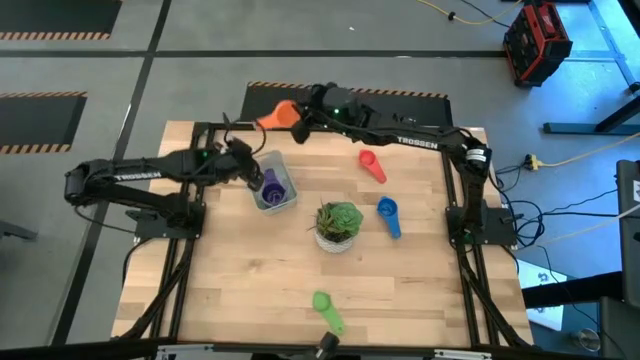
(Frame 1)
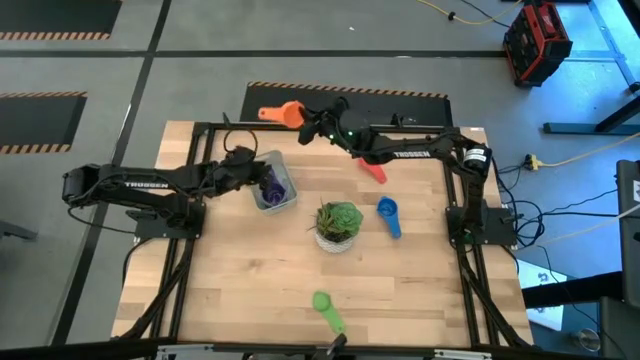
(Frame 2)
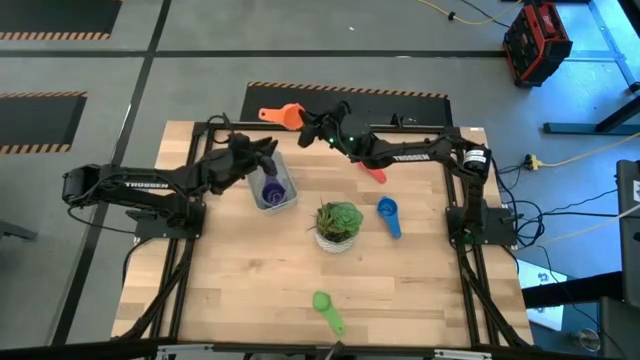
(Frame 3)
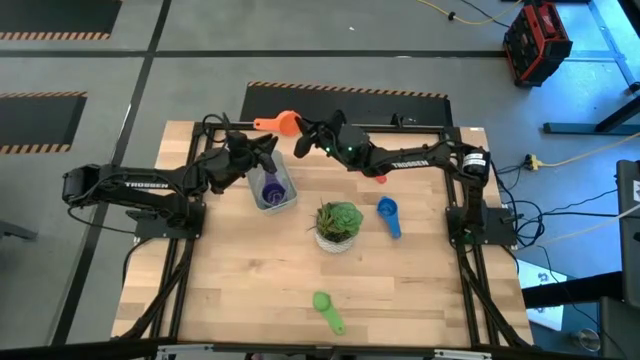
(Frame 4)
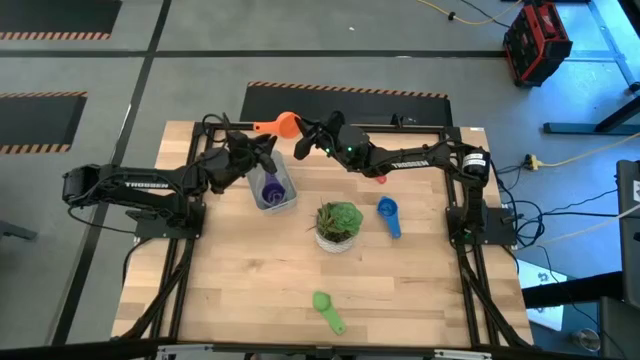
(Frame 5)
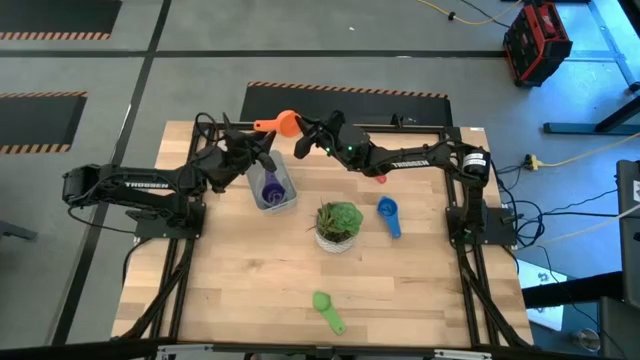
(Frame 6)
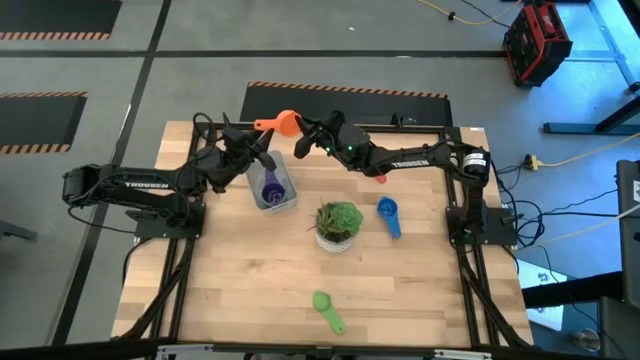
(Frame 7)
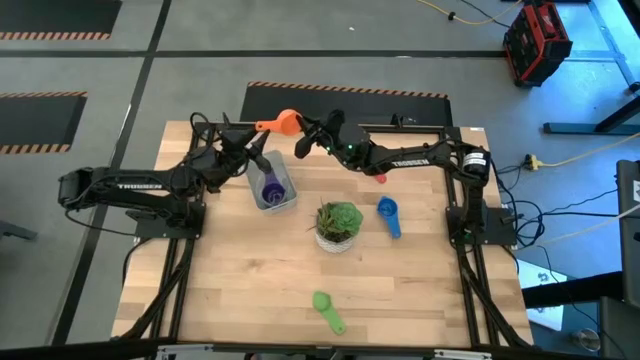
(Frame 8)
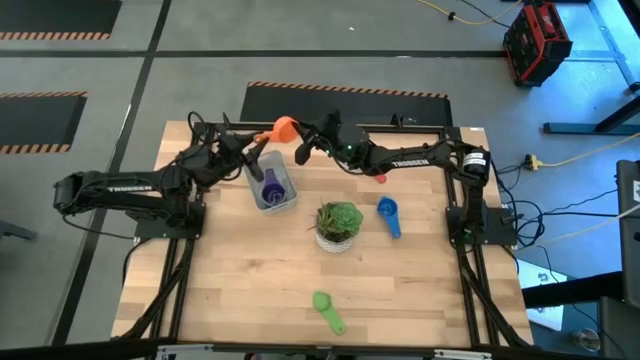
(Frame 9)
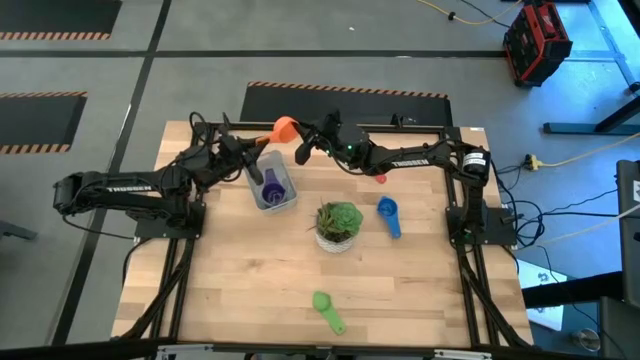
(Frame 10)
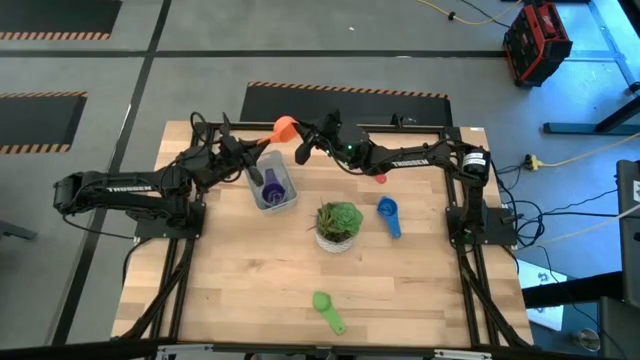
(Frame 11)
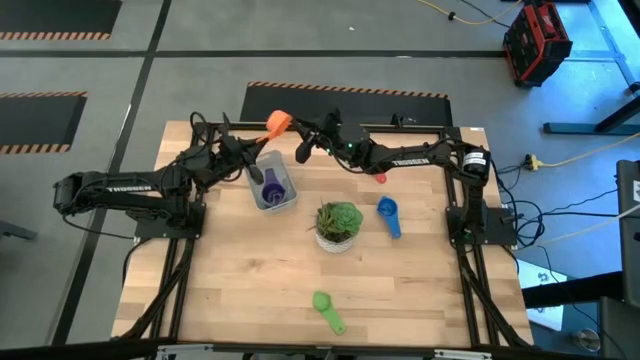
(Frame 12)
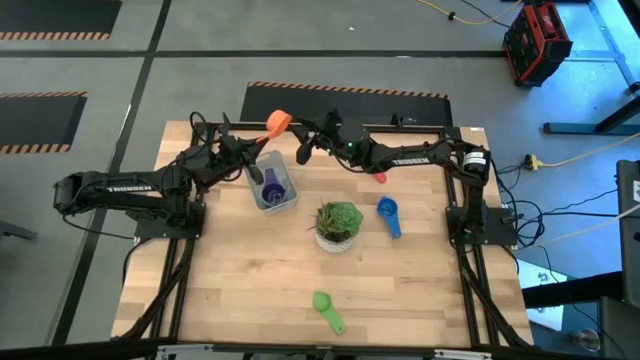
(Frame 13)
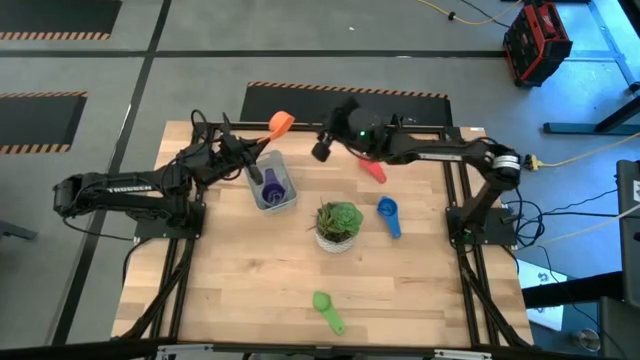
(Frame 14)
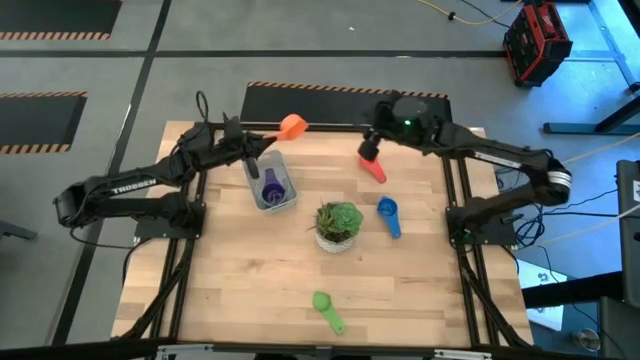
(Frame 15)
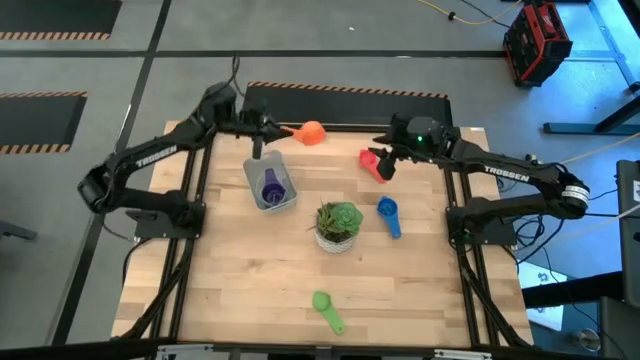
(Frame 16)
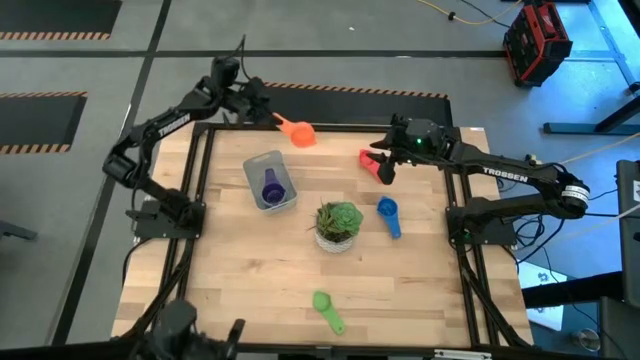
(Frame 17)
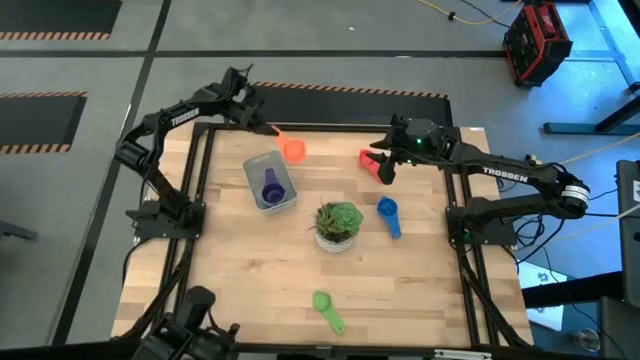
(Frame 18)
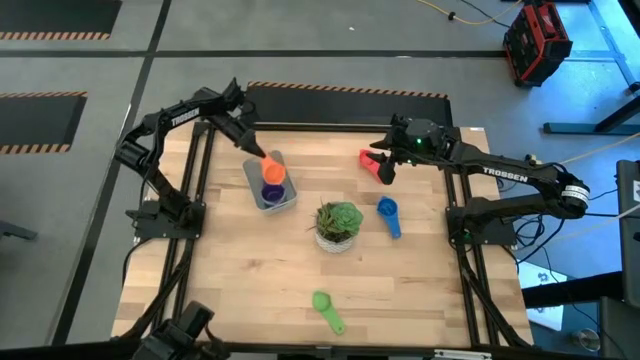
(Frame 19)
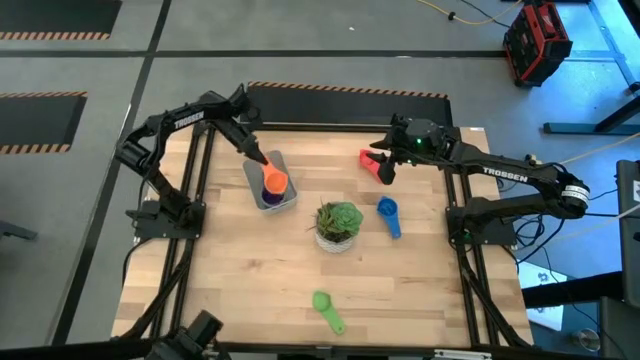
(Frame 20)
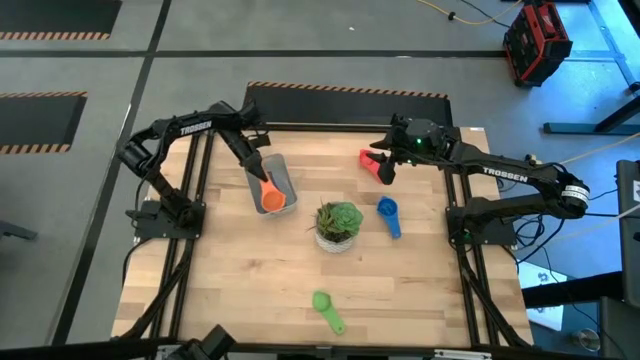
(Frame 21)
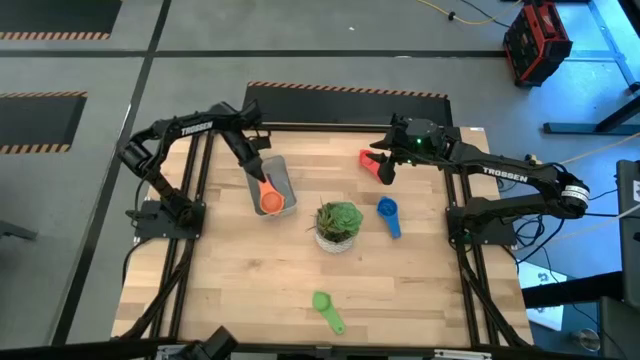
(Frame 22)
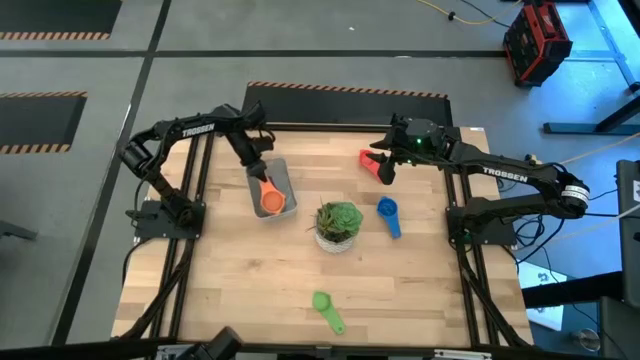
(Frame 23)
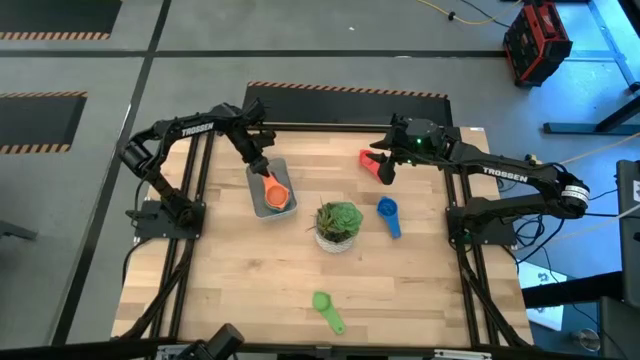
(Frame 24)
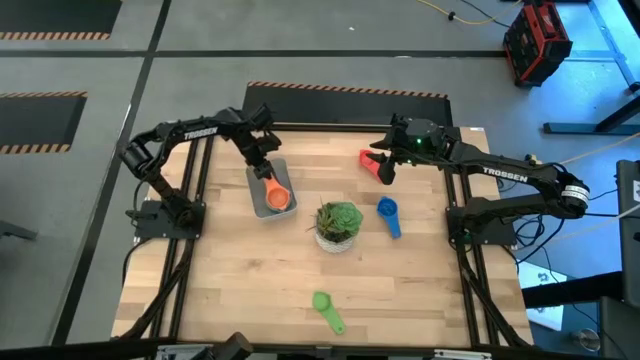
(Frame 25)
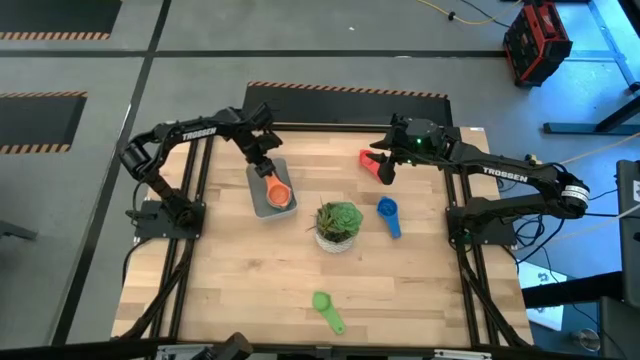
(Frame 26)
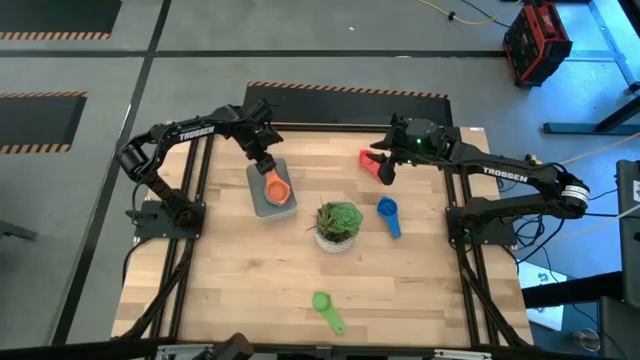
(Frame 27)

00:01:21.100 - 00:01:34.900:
Task: Nest measuring cups in basket
Stack the orange measuring cup on top of the violet measuring cup in the gray bin

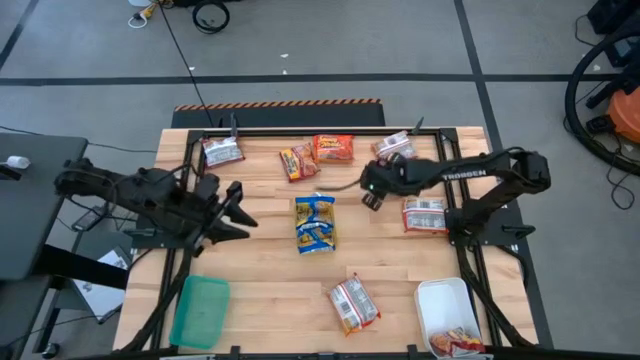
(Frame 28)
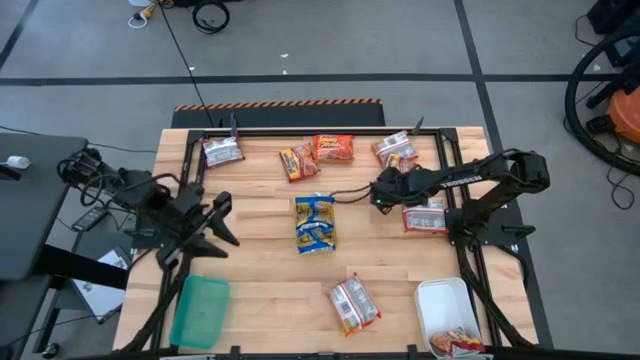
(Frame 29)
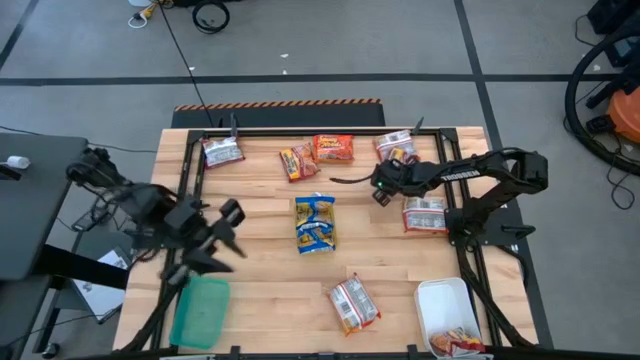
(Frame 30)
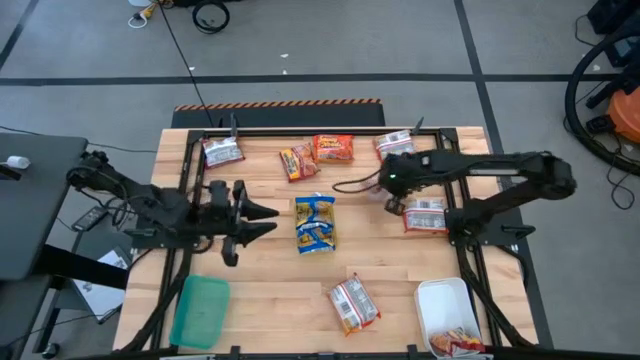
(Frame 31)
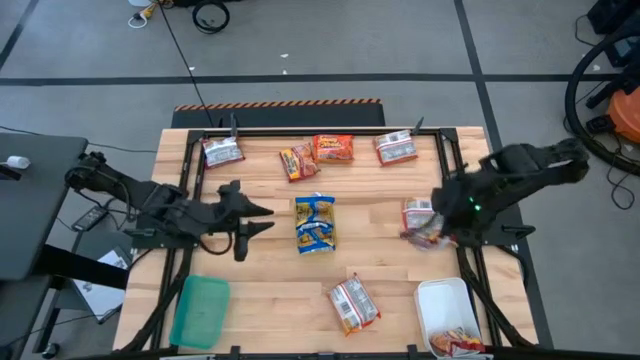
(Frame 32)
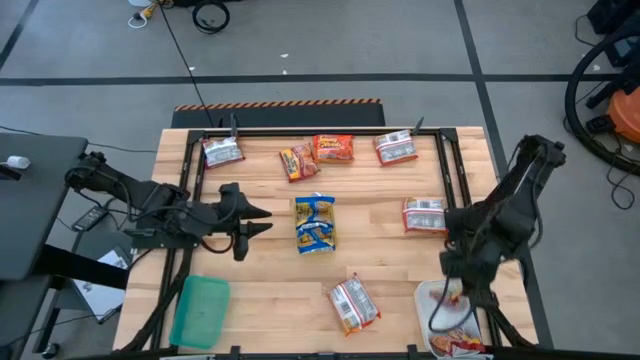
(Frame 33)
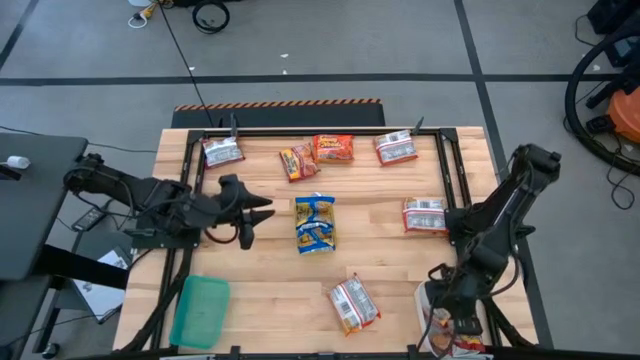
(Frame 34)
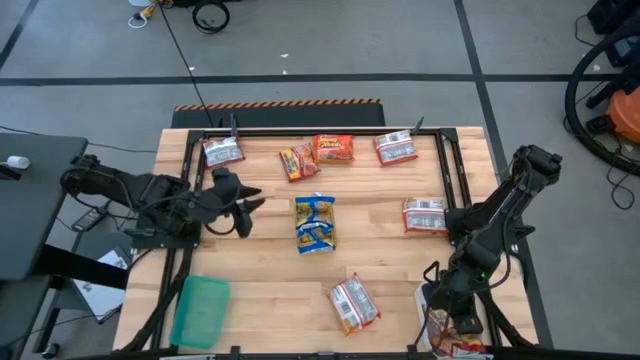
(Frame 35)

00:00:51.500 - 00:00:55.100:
Task: Sort Maruchan noodles
Put the red noodle pack into the white bin
